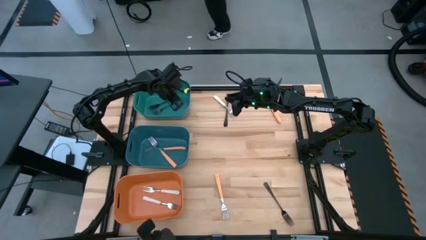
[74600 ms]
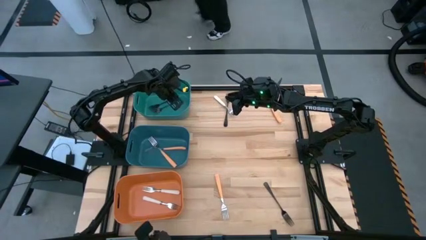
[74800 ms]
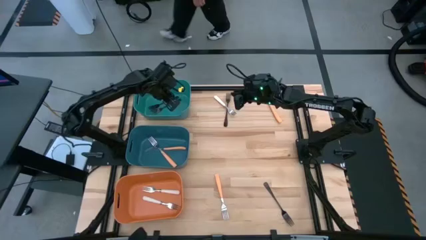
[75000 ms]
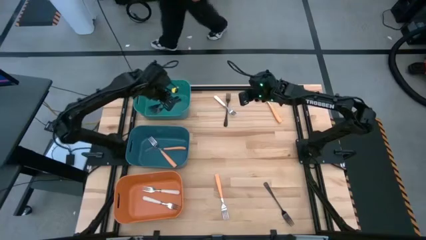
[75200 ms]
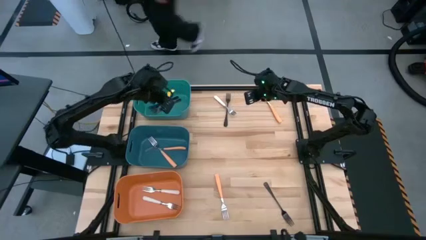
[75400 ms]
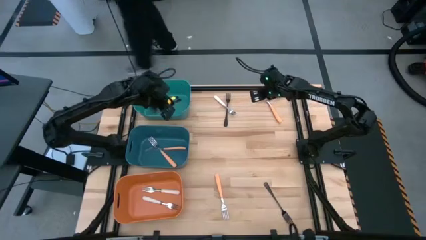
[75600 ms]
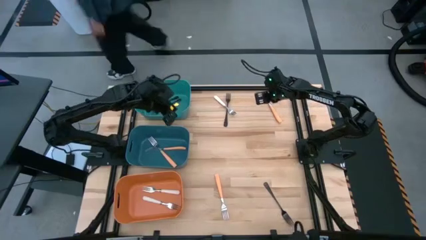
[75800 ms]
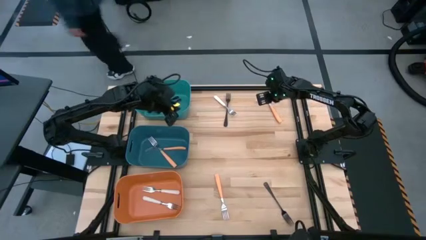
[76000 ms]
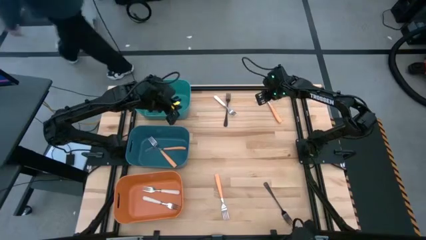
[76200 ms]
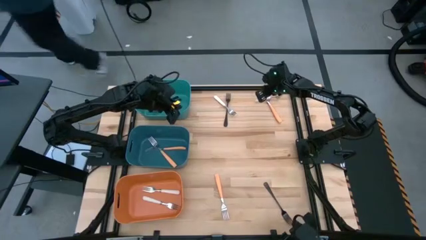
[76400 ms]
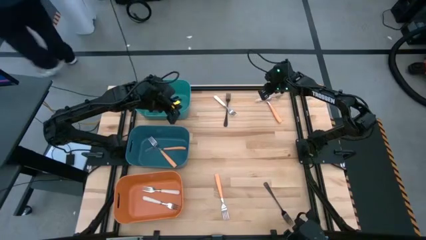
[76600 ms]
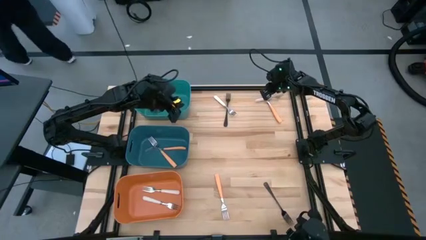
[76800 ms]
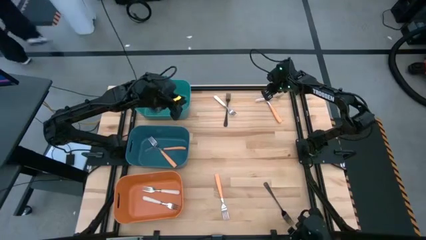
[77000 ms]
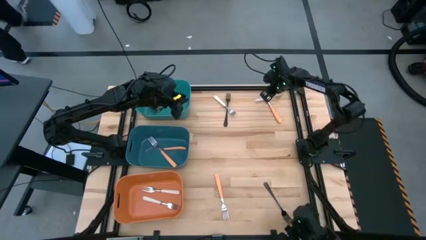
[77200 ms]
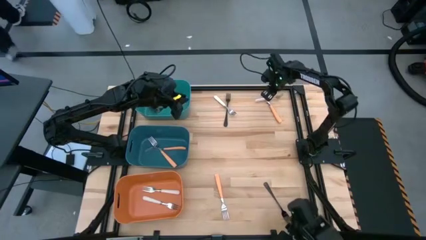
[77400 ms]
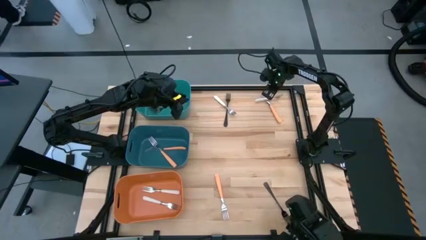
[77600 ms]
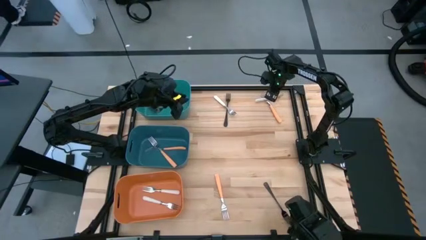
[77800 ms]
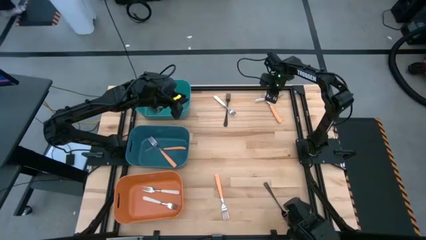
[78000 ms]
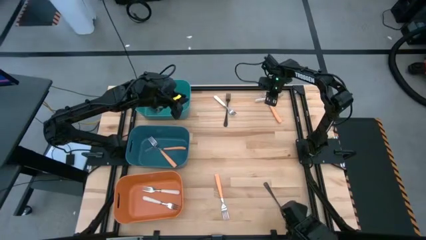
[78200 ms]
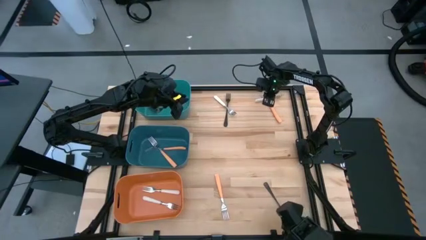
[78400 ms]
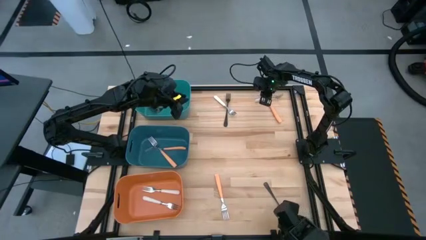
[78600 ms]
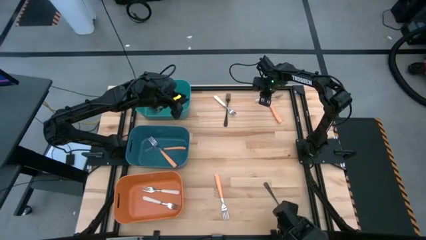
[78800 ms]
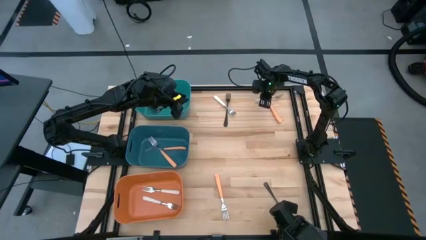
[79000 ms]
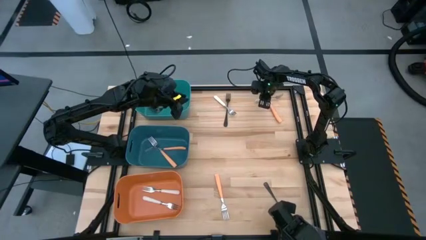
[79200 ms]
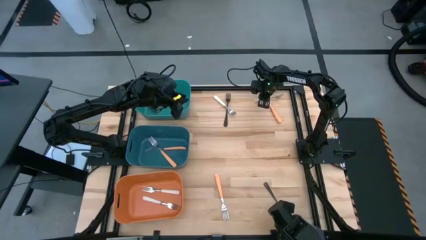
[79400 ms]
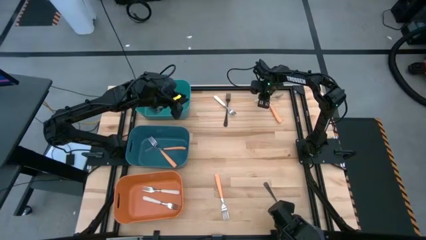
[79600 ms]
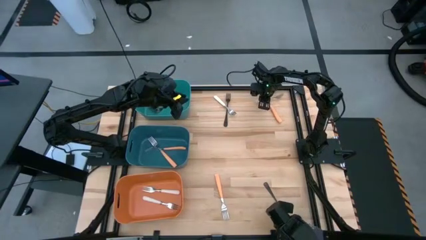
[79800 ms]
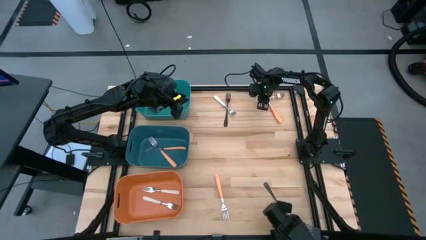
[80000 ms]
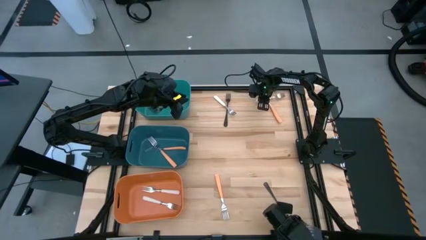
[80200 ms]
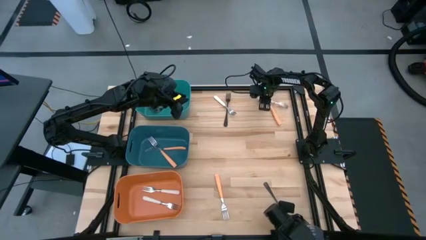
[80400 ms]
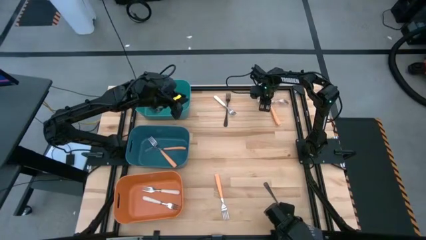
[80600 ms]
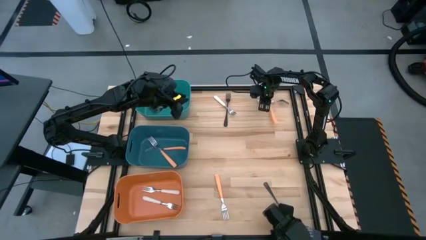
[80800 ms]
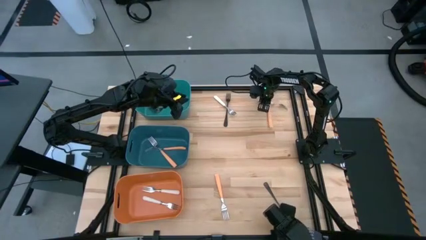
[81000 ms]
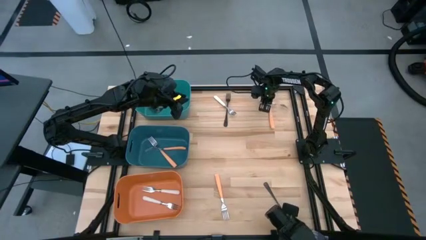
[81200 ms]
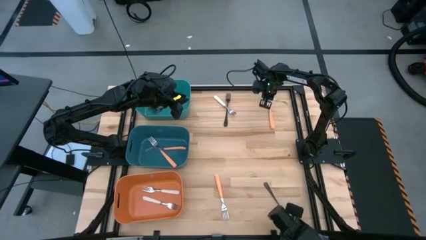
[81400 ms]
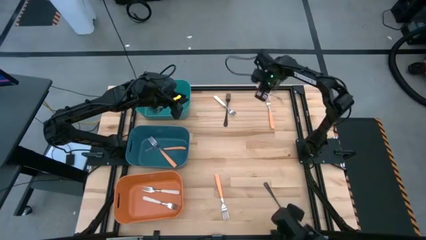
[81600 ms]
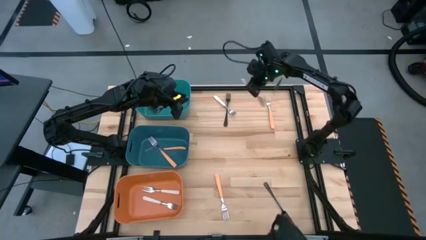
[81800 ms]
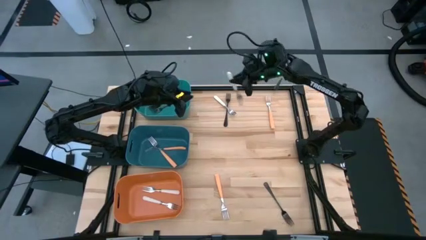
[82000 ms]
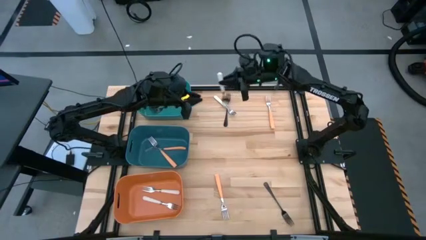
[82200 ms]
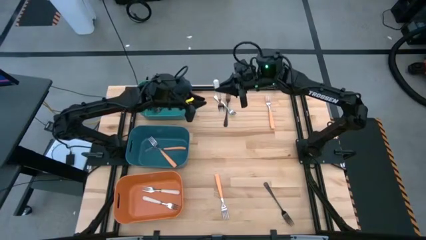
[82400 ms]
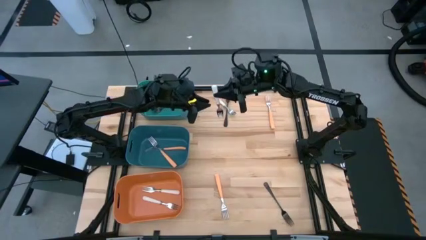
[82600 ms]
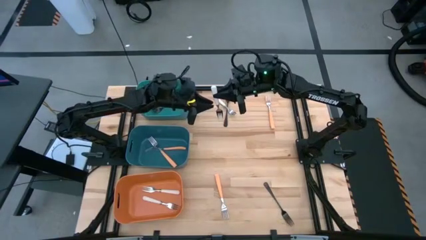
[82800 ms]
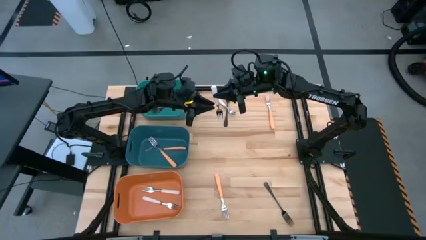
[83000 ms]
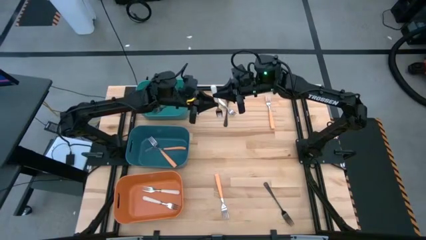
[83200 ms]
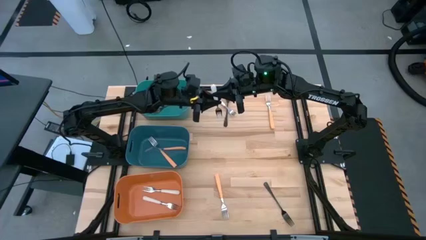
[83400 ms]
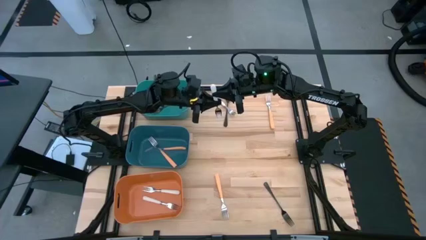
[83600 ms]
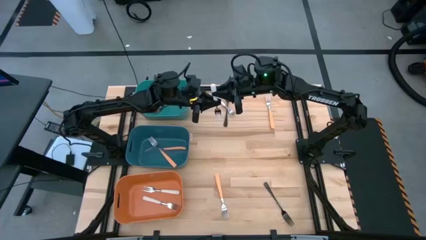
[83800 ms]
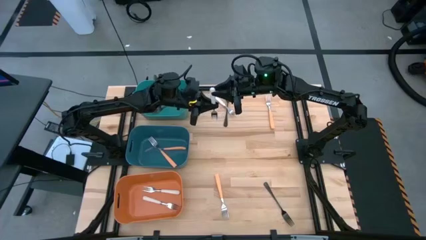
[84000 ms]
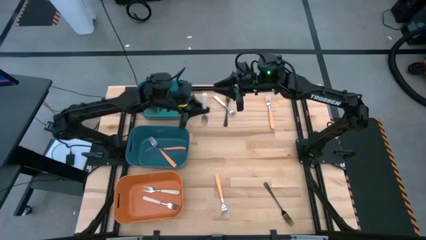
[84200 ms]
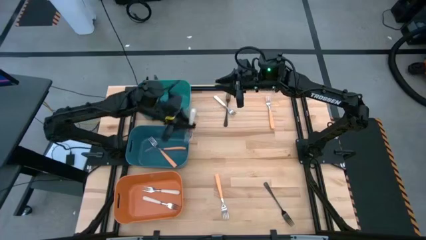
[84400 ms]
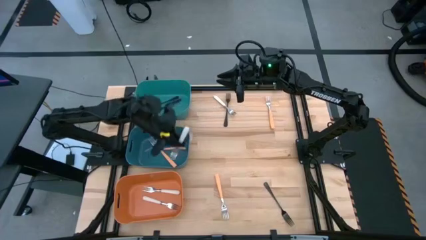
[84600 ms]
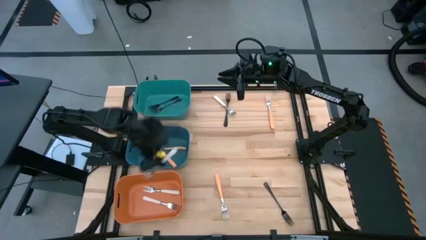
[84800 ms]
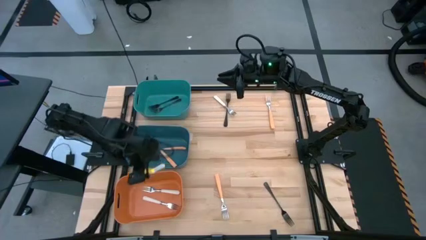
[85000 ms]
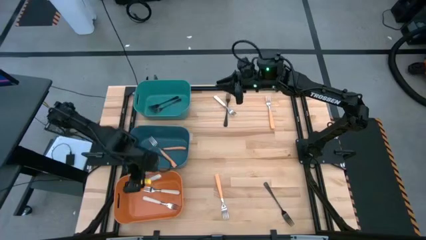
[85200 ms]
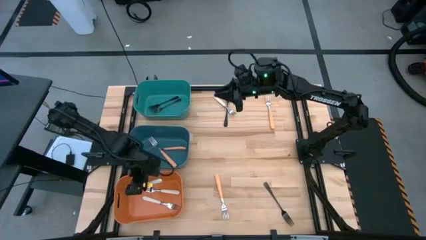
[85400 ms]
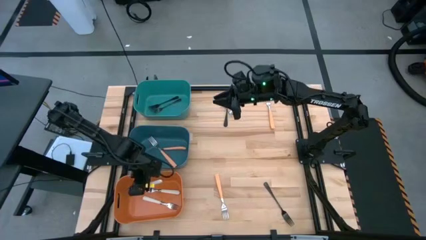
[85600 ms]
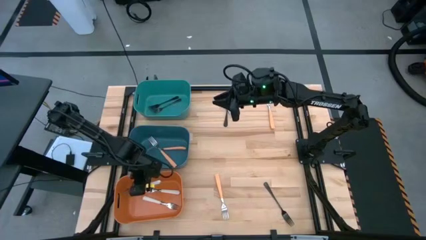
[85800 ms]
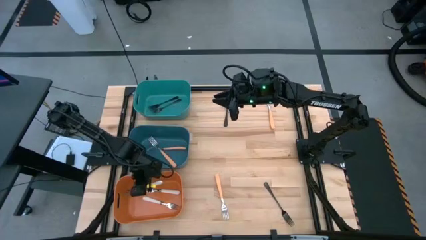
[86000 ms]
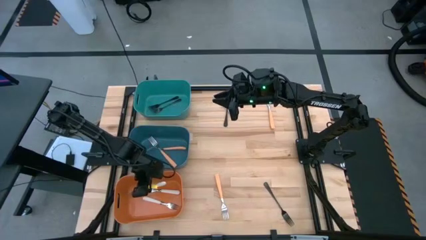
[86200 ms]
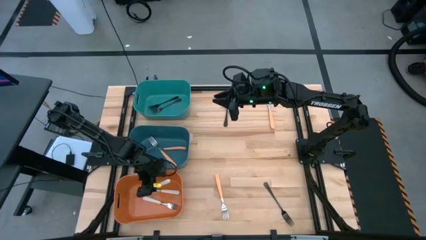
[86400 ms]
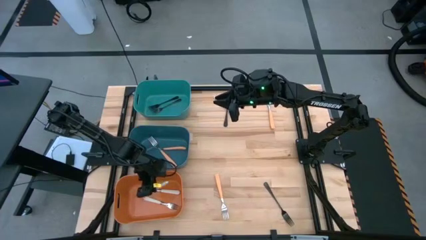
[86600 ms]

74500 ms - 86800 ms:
Task: Sort silverware by color (type)
Put the white fork into the orange bin

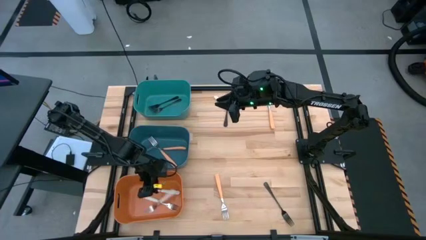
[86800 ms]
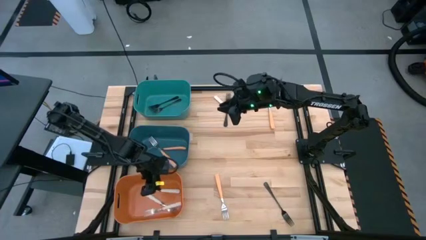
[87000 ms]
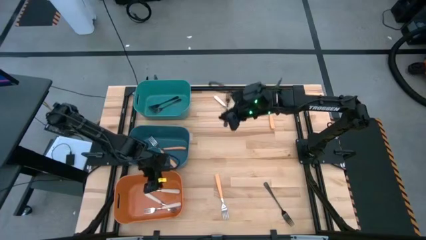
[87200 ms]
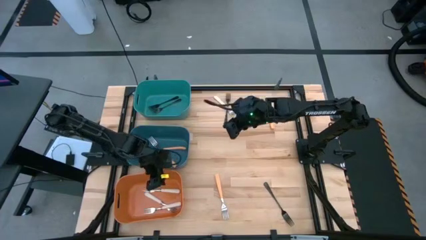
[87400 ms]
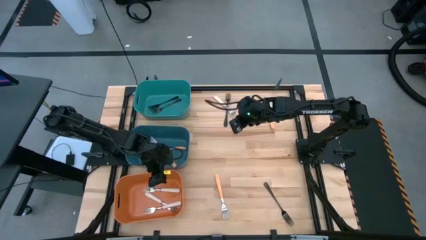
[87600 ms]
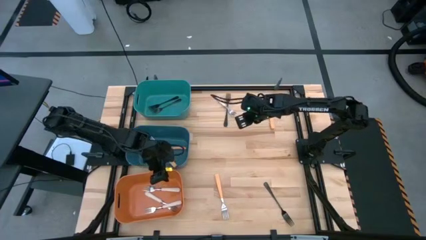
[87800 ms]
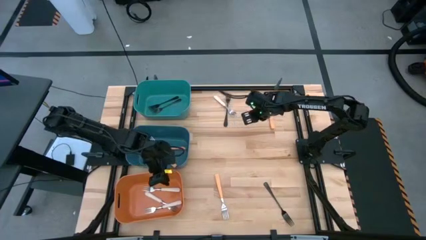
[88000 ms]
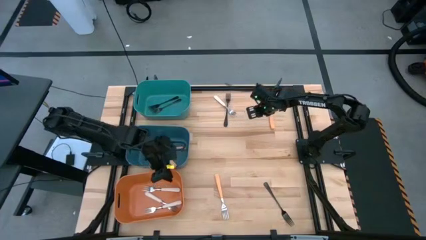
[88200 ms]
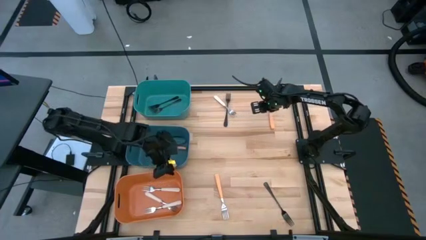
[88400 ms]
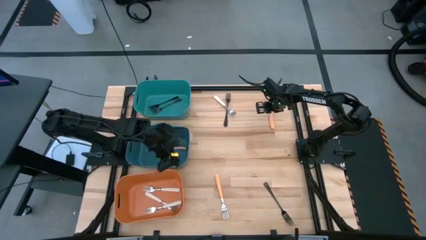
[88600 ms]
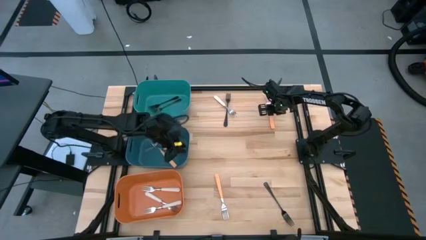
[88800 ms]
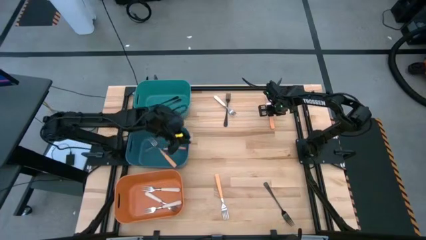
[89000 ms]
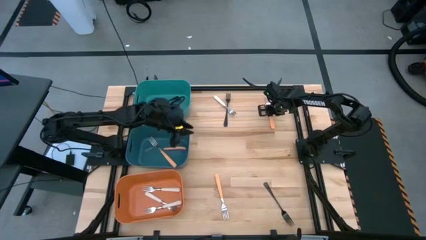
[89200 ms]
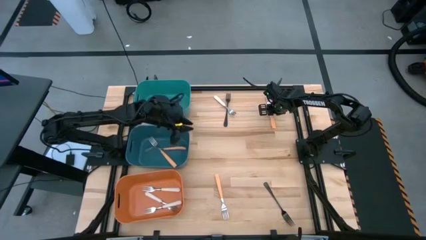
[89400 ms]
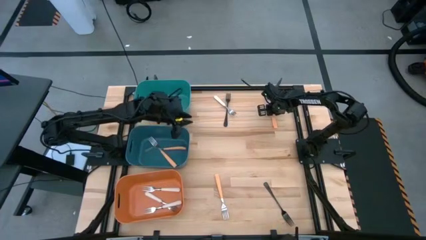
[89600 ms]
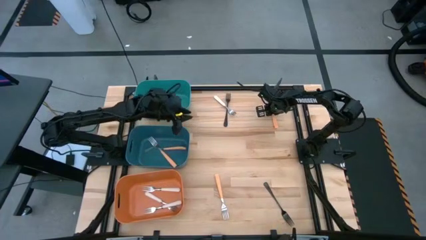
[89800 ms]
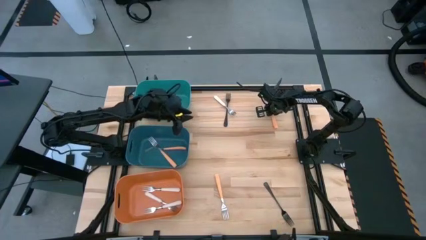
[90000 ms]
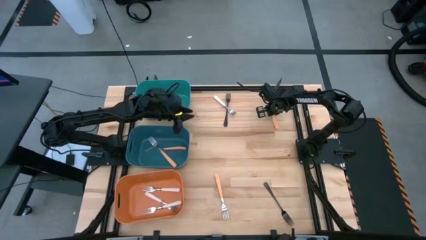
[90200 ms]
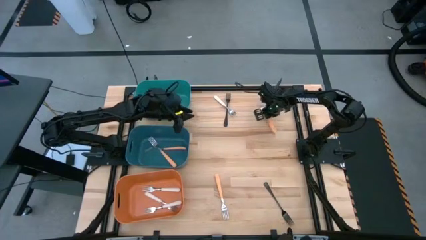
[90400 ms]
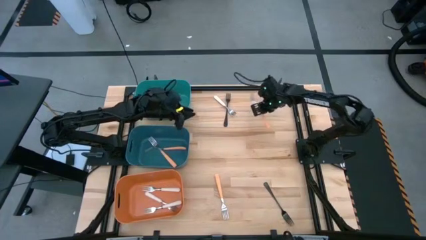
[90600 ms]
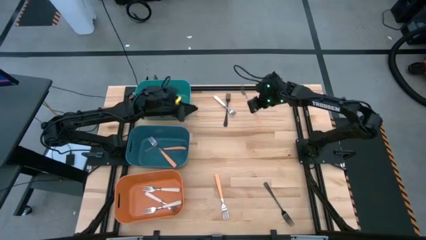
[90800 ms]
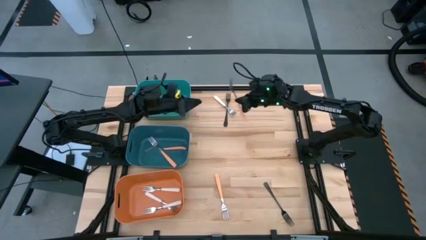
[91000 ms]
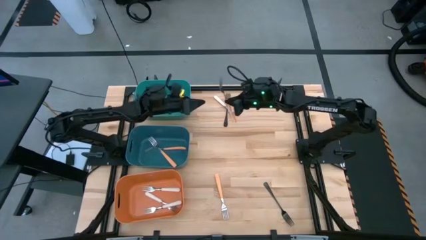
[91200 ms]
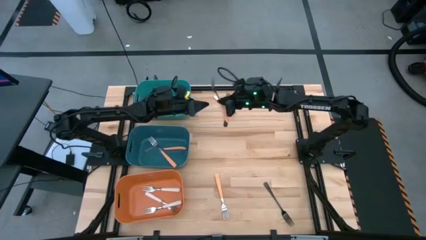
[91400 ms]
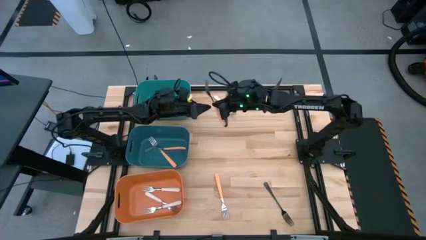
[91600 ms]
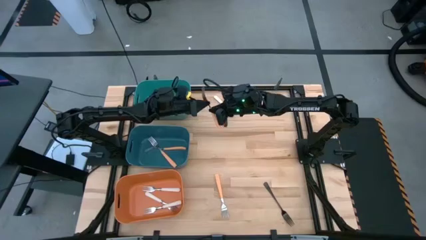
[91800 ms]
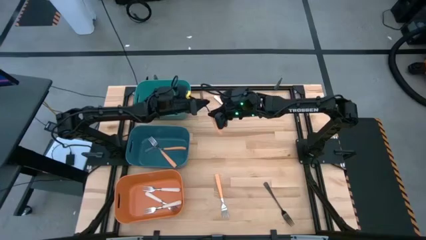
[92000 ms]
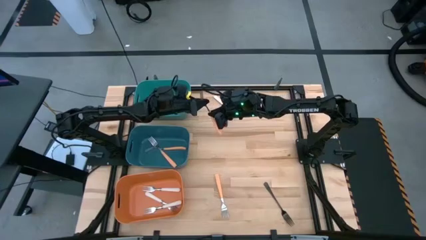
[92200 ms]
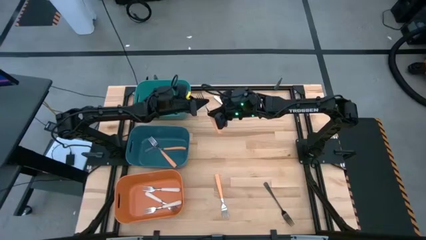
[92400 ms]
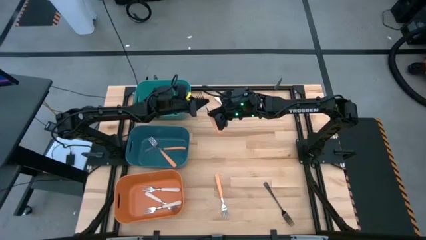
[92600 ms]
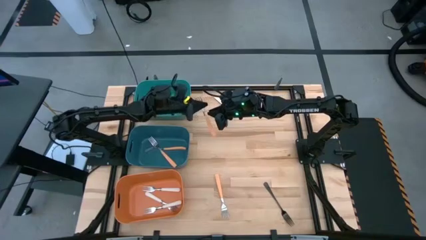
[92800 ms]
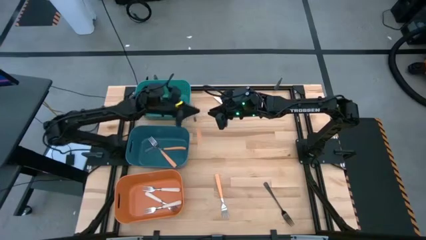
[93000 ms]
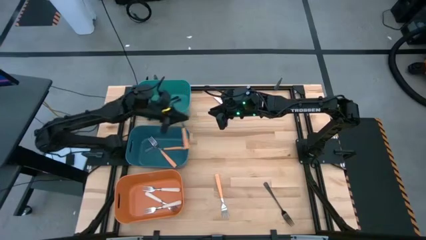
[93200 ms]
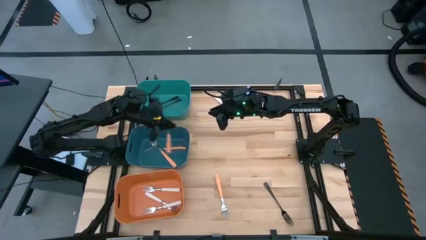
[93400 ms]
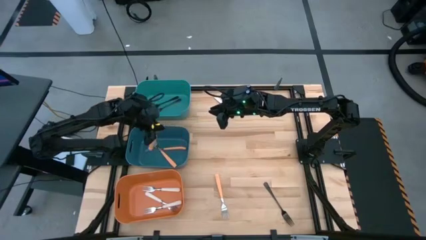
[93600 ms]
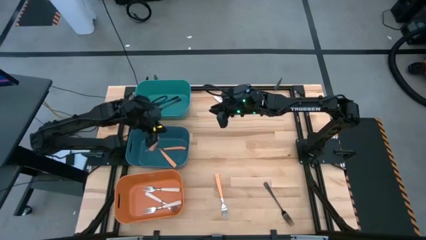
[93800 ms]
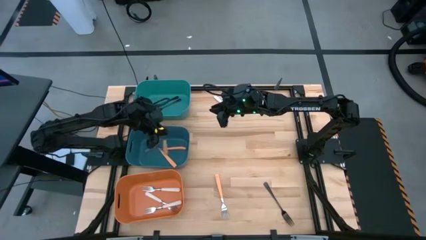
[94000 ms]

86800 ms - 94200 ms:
Put the orange fork into the blue bin
